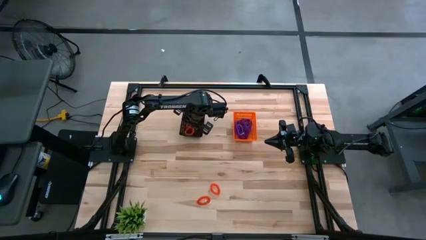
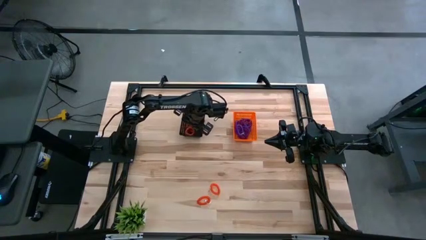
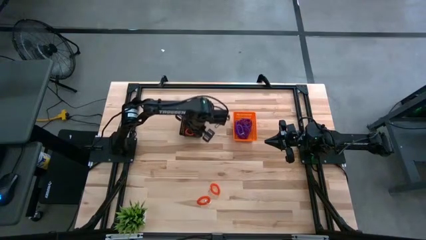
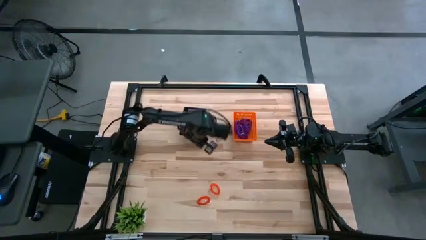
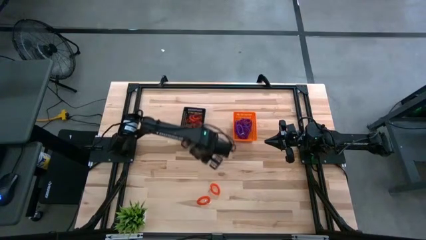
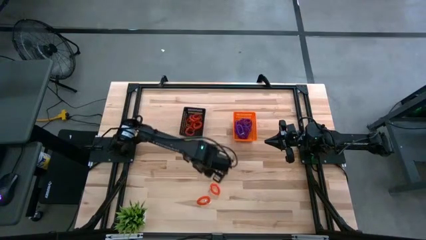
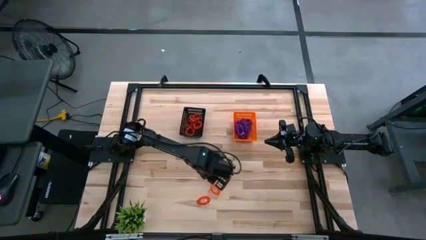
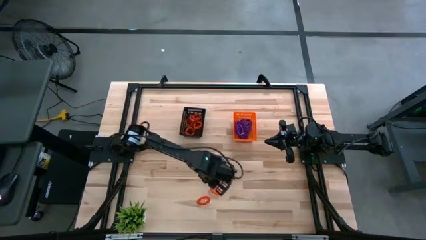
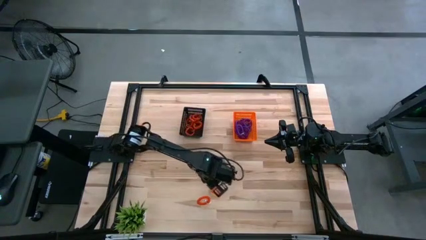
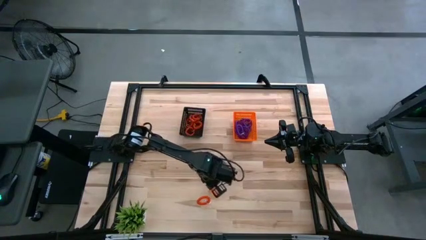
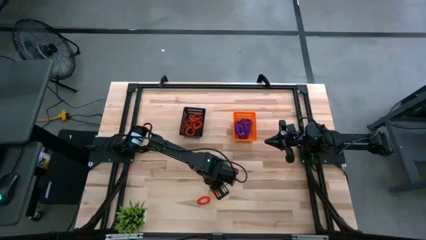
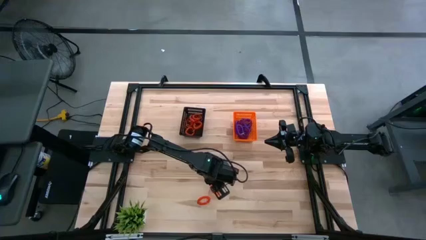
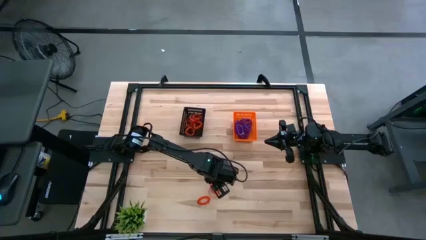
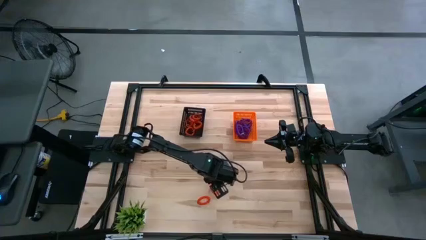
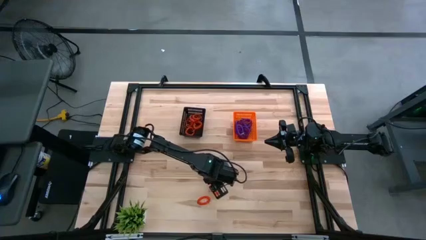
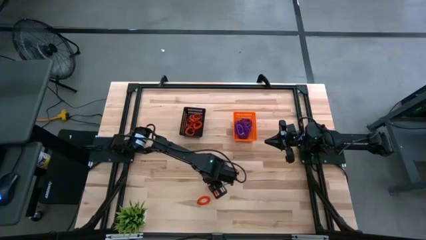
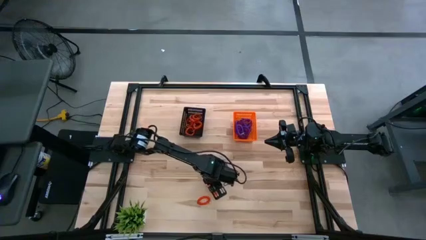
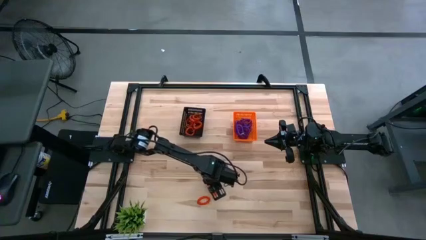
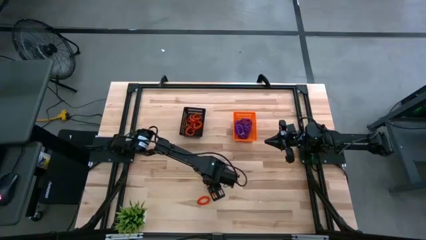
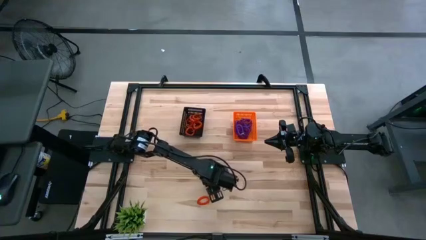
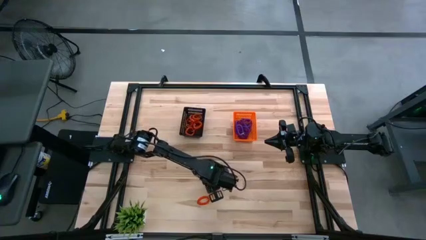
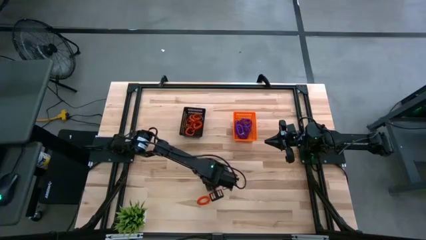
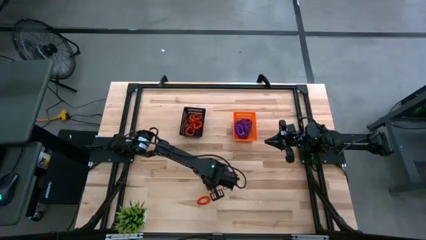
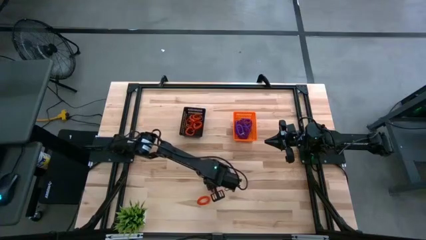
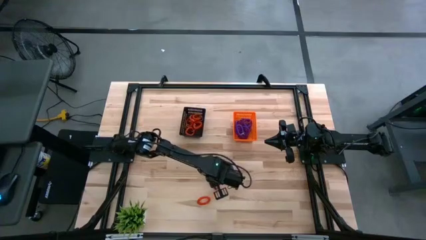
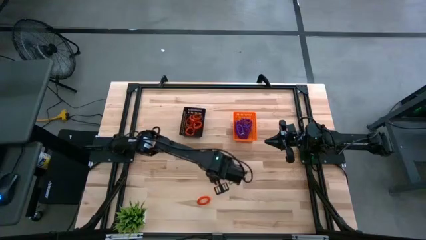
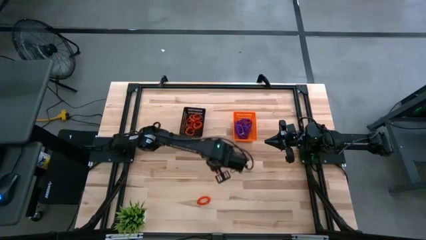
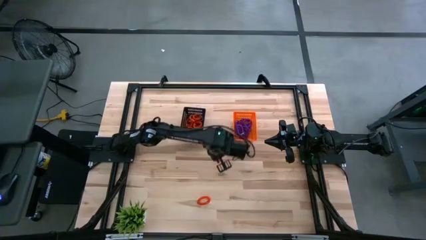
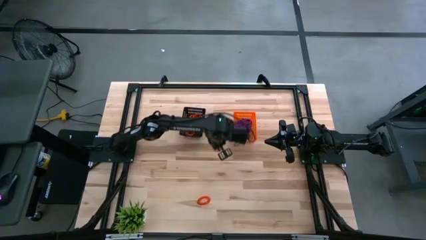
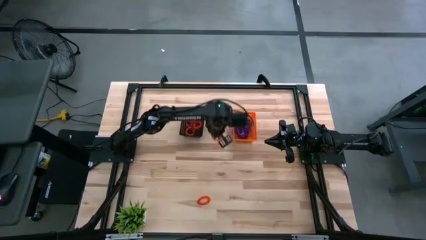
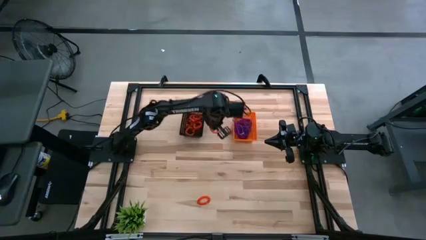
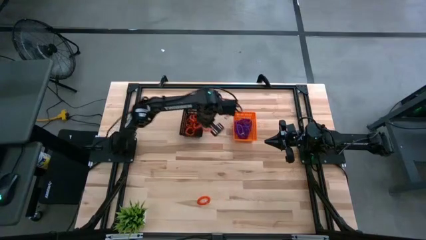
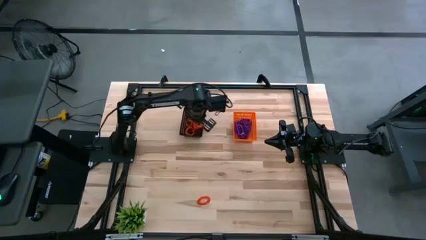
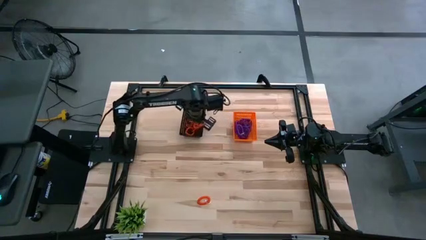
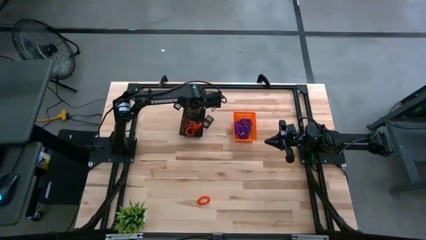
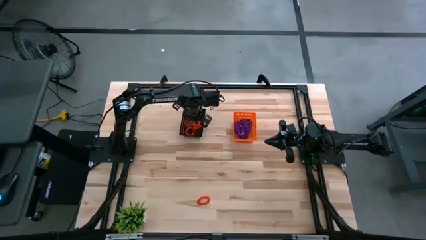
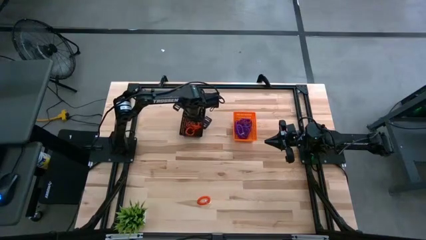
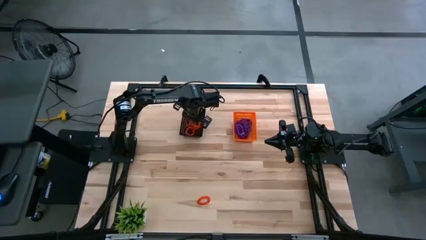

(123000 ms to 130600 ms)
Task: Sort spring keychains into baskets
Put the orange spring keychain into the black basket

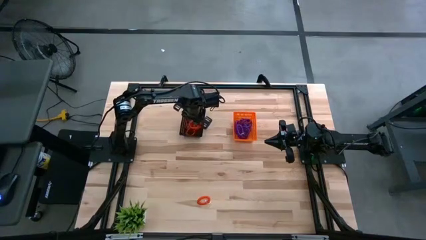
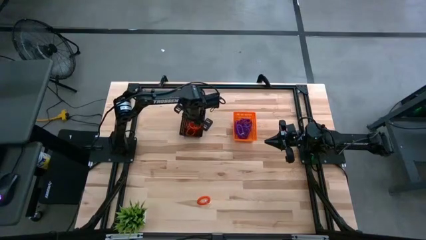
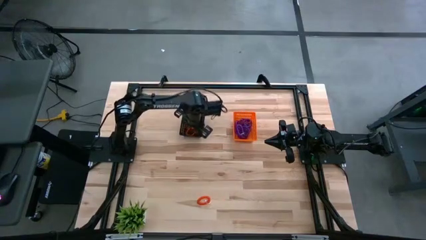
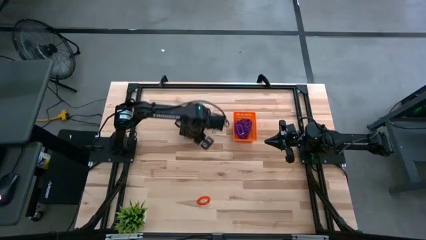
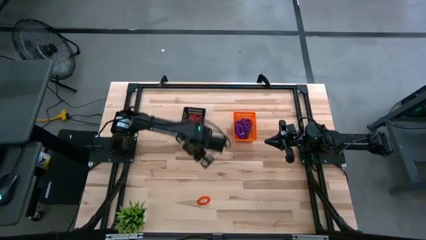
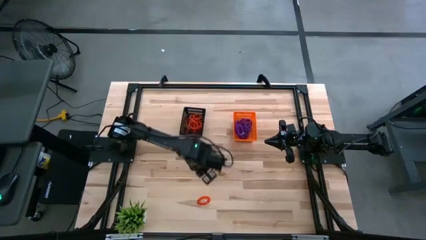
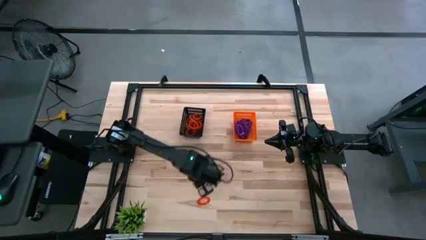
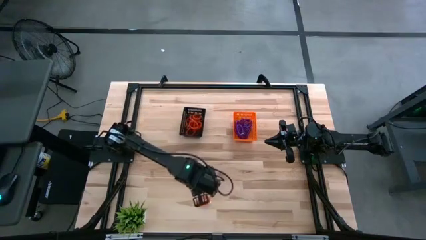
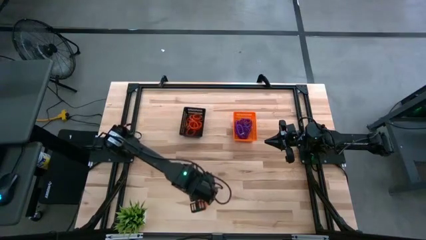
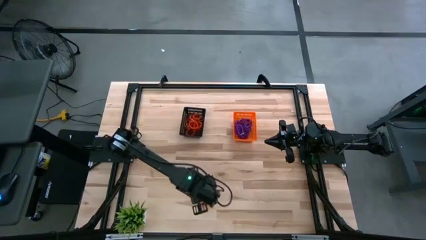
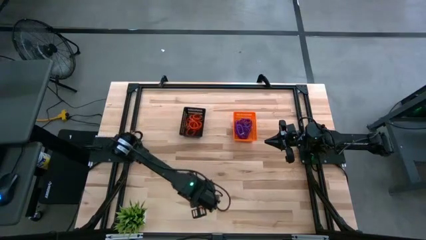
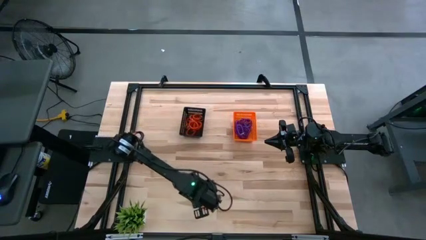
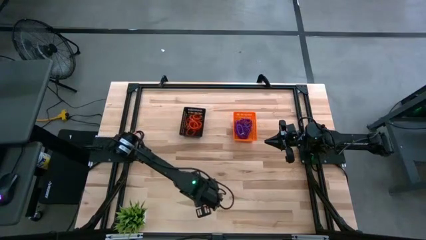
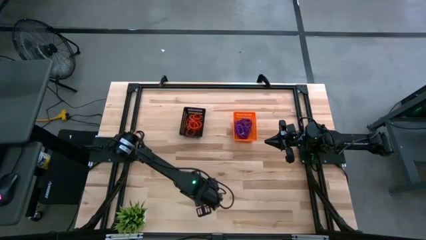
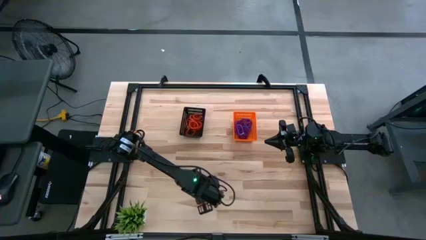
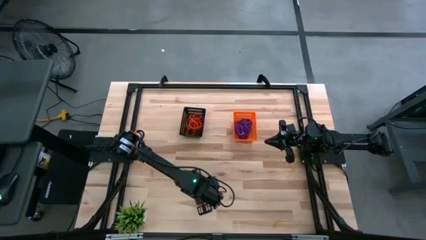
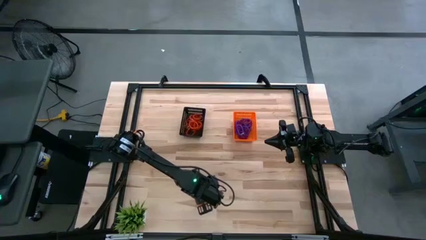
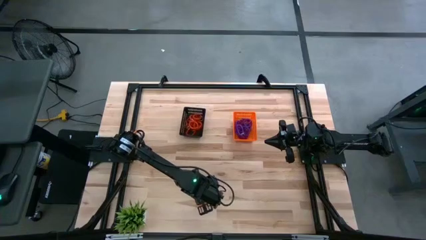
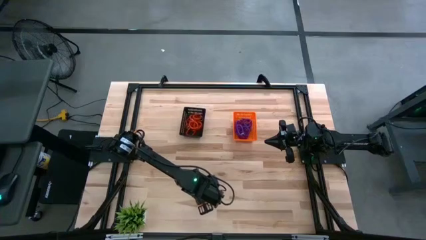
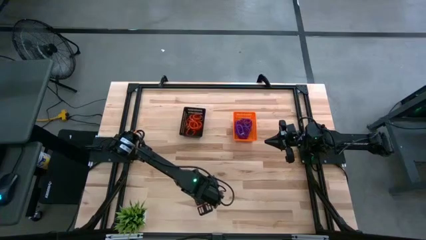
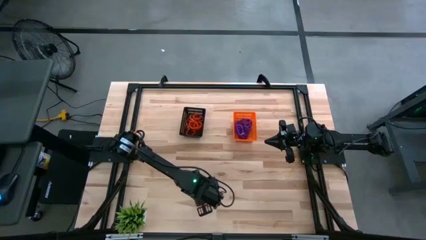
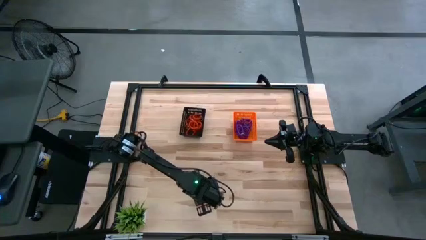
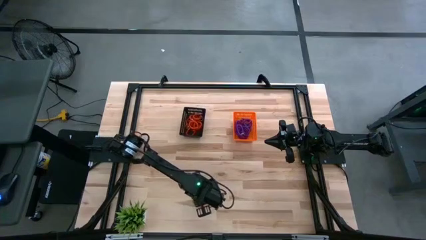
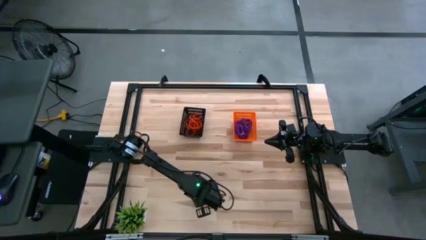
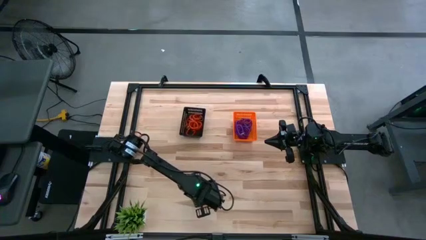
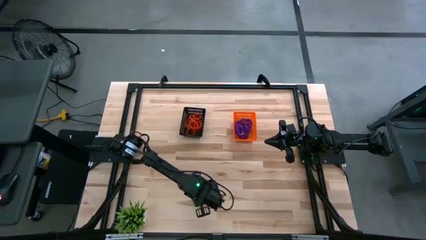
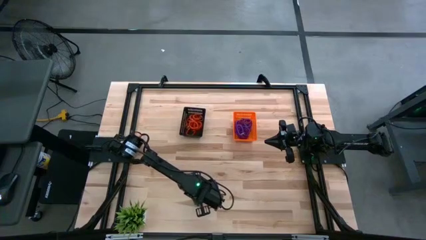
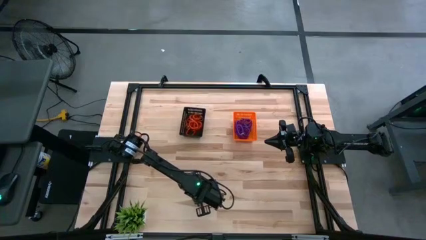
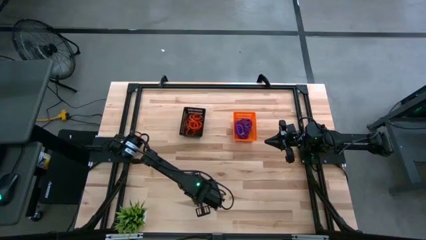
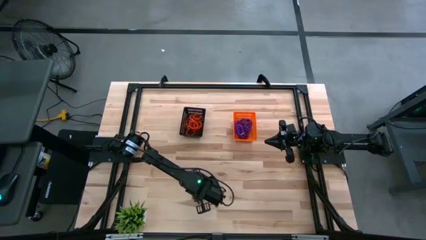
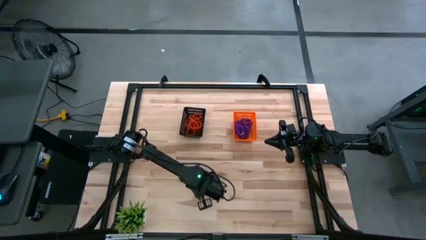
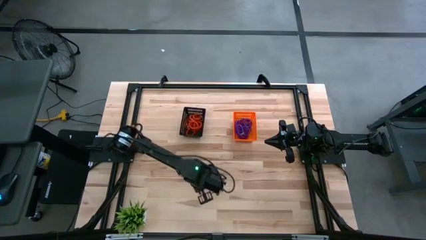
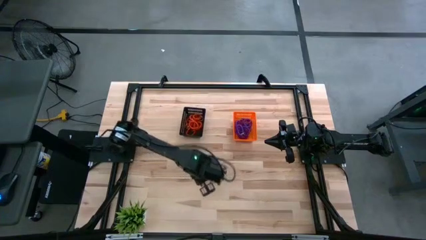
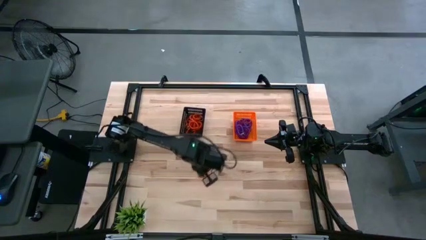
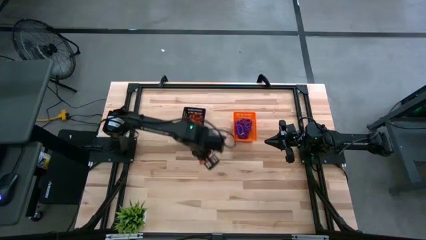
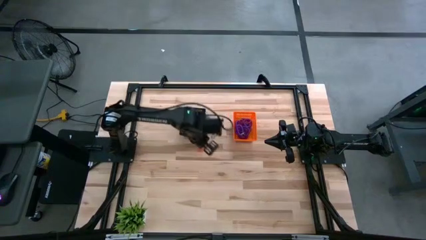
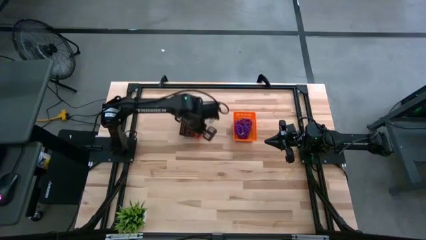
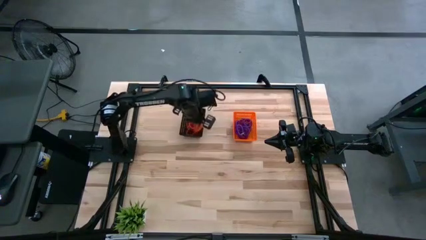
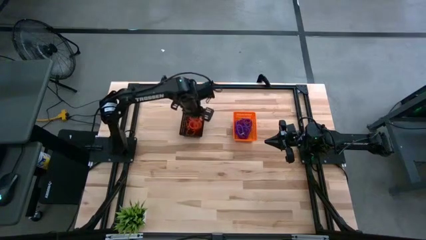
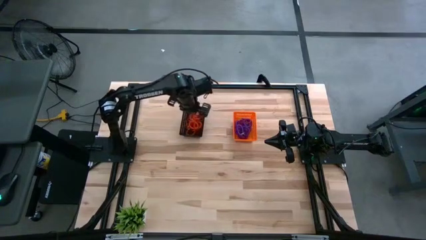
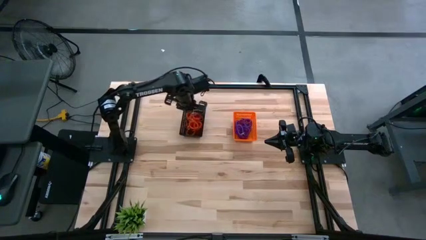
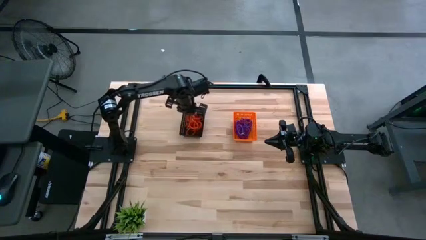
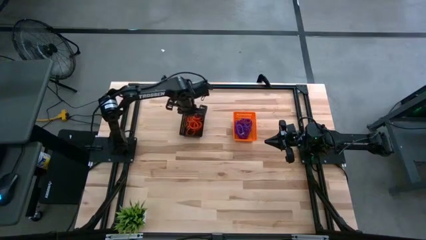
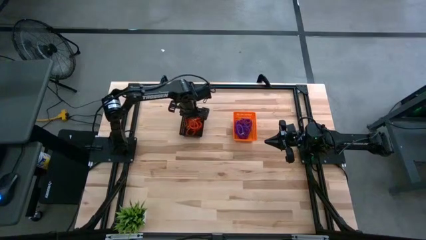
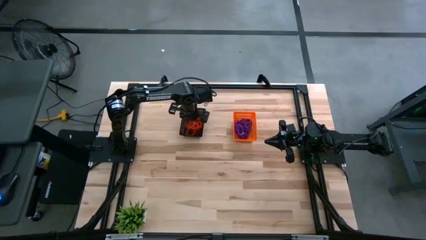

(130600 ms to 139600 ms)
Put the orange spring keychain into the black basket
